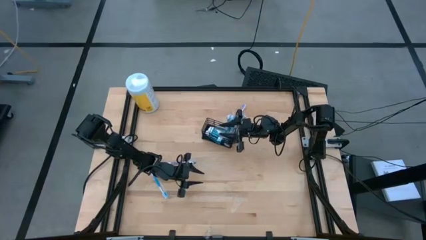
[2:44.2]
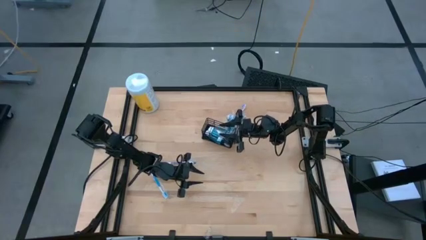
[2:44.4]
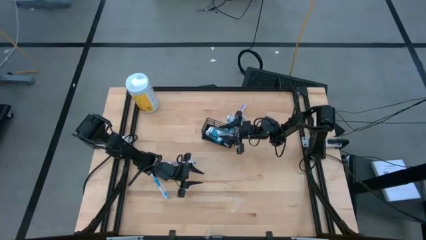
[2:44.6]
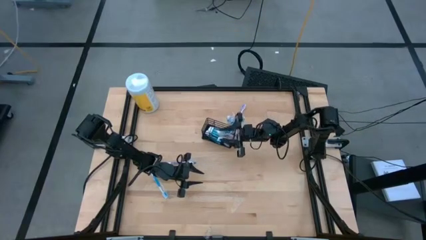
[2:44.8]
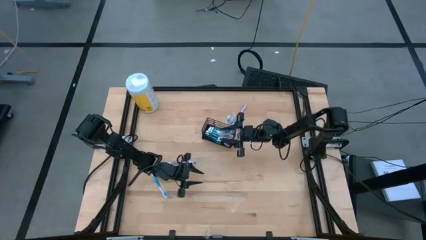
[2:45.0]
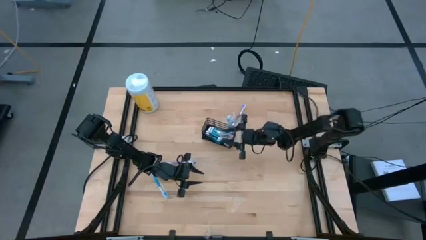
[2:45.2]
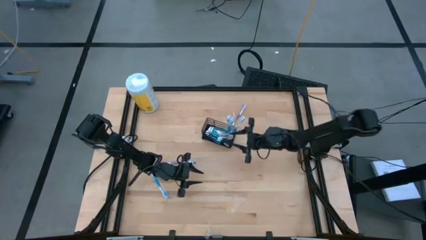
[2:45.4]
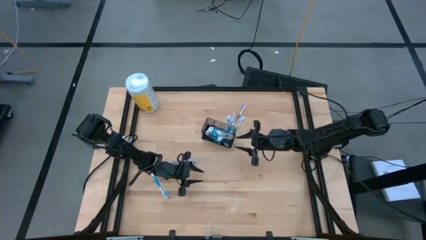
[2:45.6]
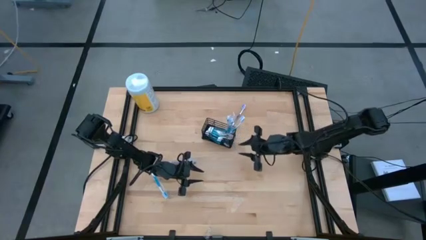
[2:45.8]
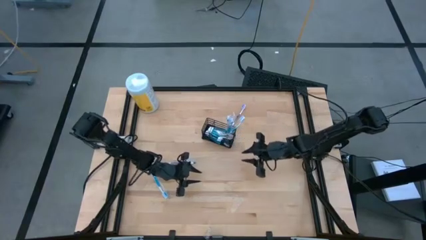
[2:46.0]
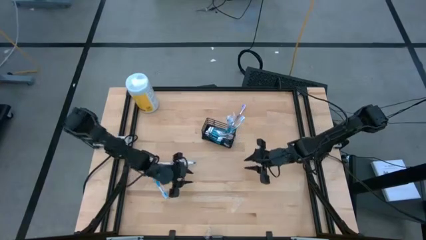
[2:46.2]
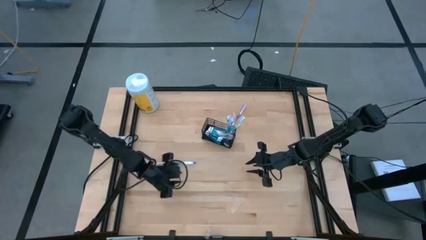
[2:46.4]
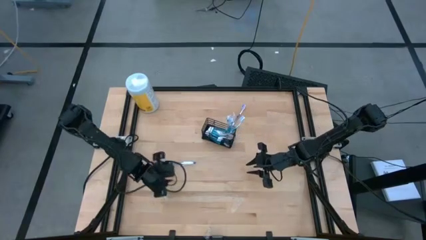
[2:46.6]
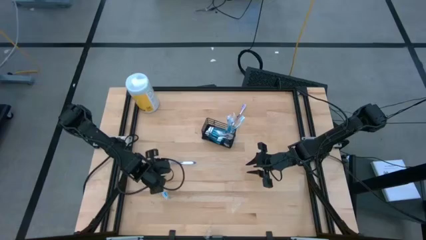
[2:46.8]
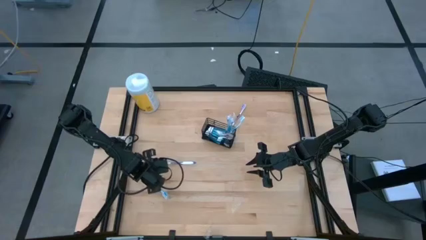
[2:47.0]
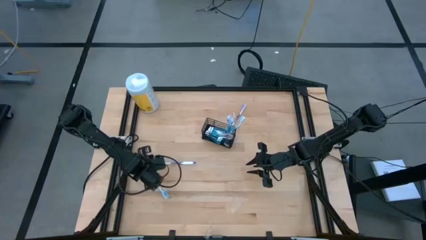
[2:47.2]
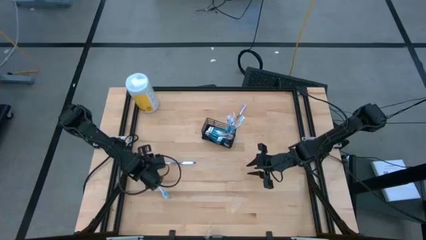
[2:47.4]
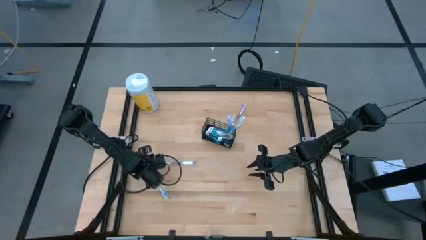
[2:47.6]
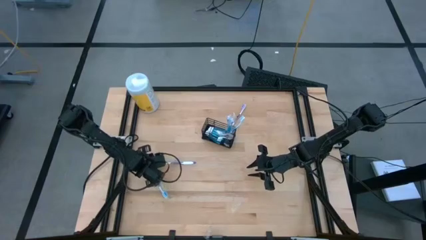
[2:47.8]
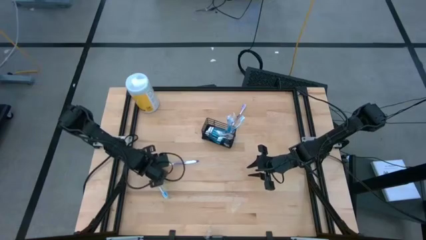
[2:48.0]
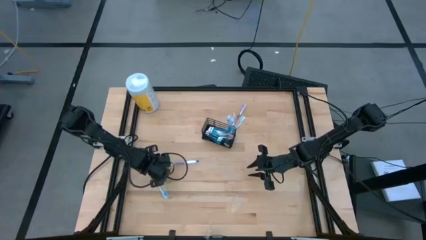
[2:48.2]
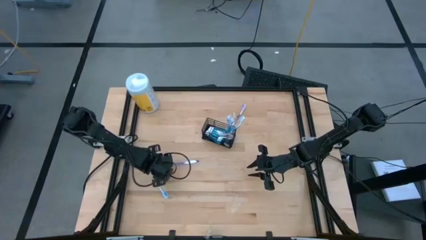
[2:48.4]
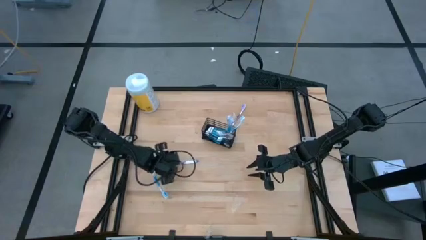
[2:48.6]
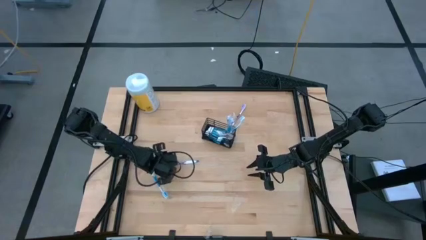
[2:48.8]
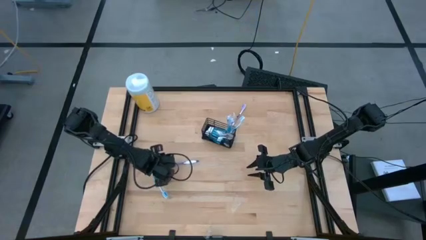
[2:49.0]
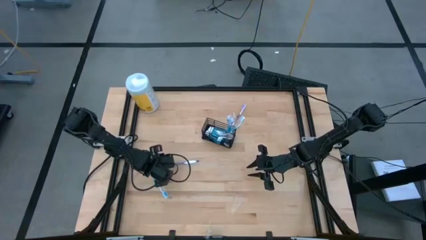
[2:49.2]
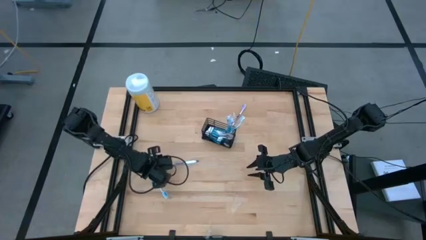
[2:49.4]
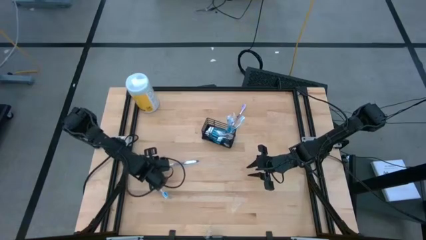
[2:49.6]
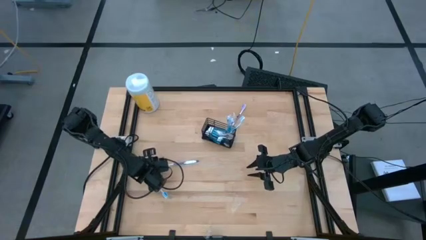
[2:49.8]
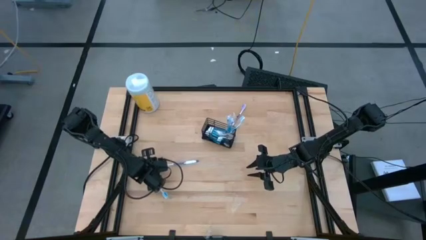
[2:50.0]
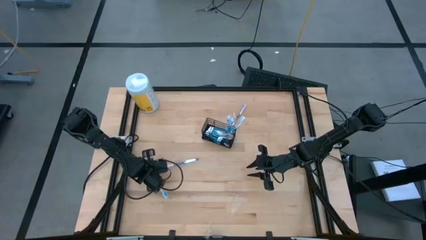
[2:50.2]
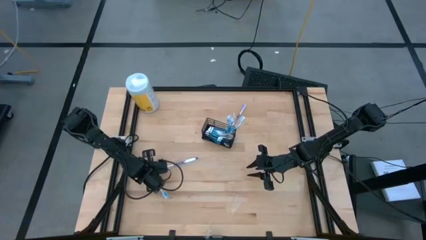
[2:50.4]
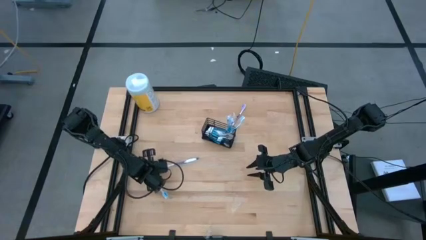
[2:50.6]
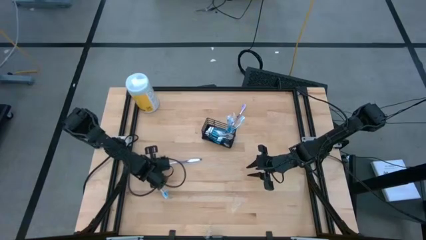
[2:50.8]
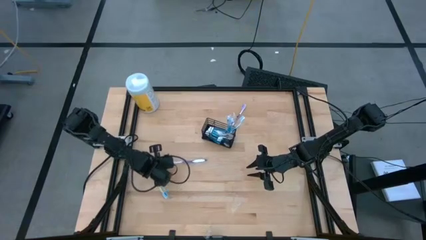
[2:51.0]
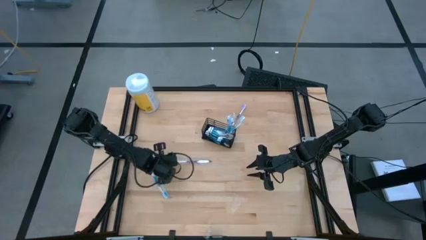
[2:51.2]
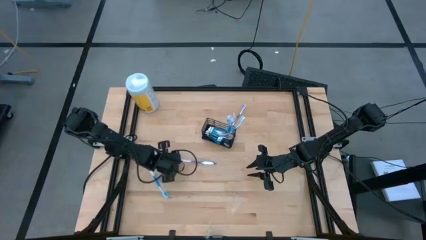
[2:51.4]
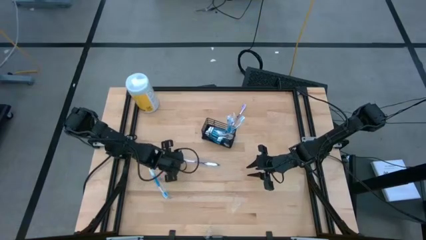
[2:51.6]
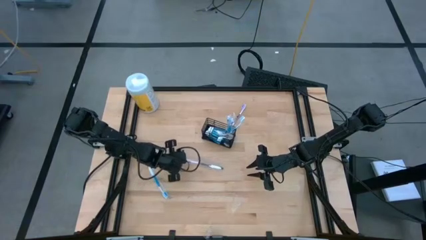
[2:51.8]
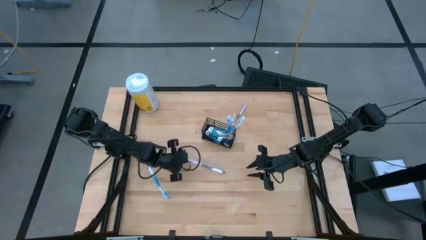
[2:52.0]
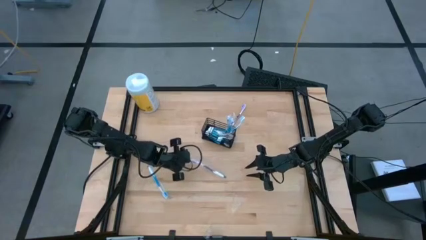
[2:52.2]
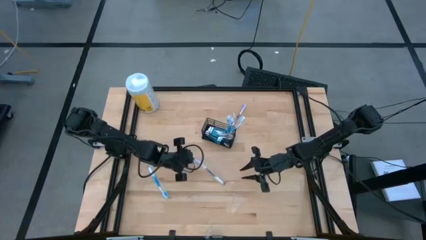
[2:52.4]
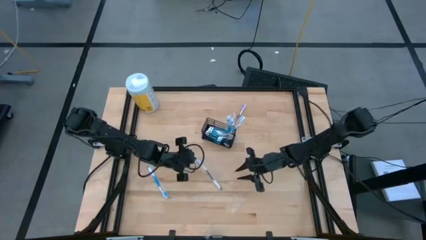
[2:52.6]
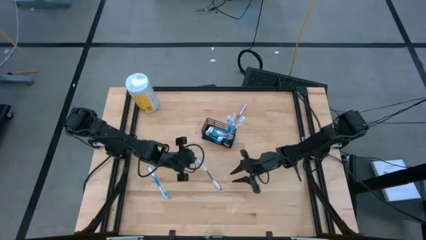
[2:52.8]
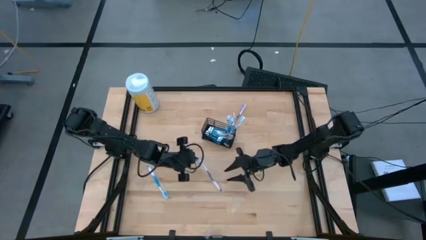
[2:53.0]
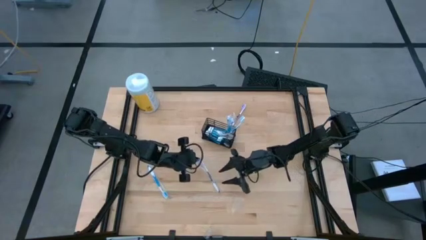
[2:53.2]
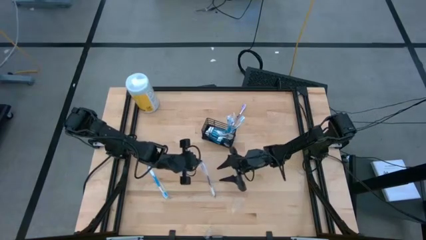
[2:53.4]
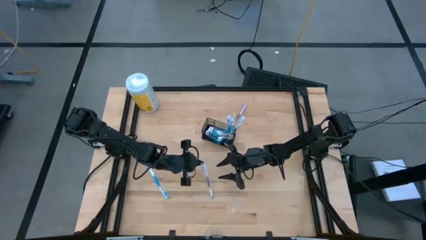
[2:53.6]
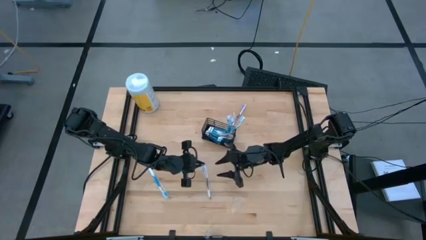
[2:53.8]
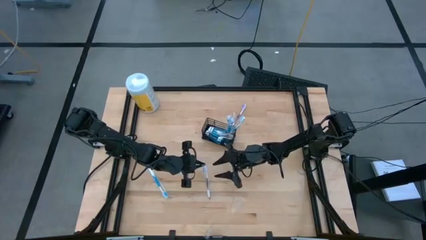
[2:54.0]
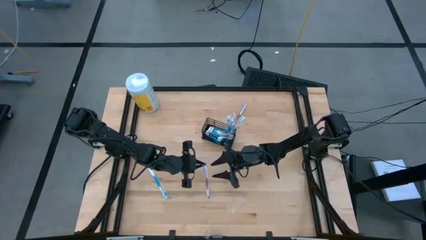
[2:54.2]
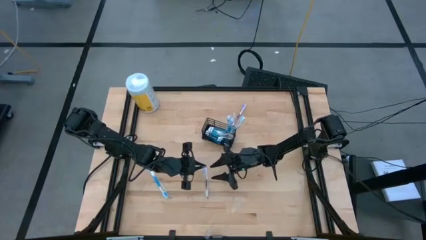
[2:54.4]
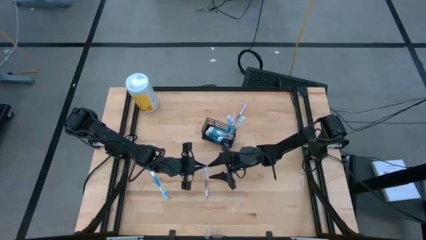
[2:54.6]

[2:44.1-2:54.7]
Task: Pick & Place toothbrushing station
Put the purple toothbrush into the wire organizer

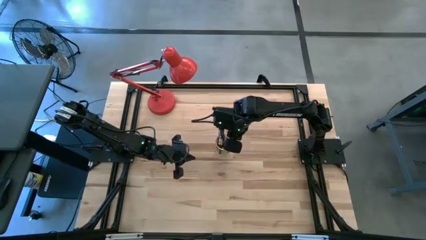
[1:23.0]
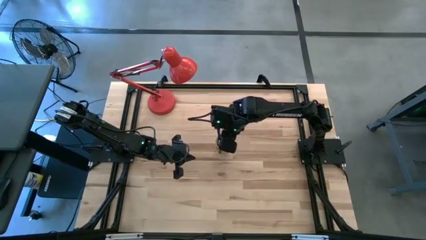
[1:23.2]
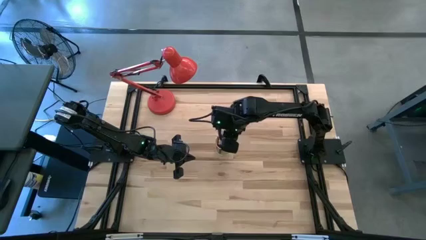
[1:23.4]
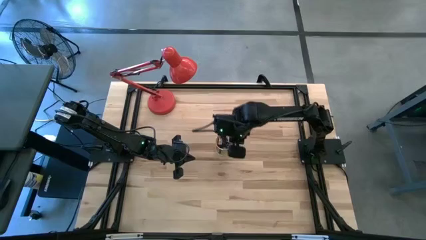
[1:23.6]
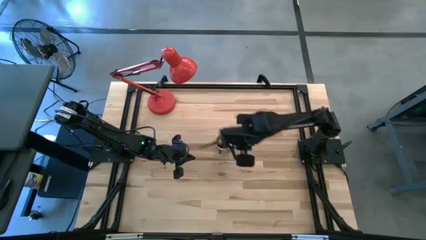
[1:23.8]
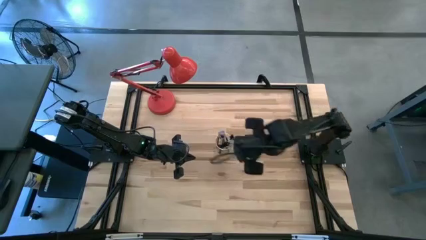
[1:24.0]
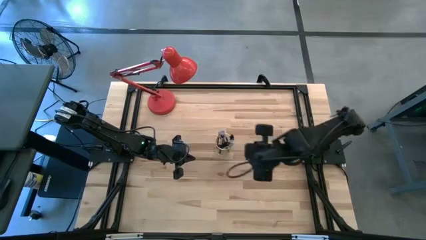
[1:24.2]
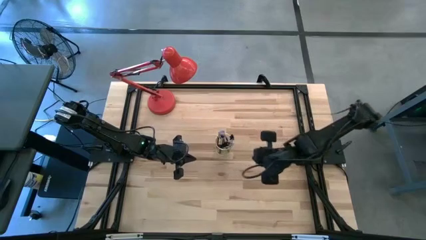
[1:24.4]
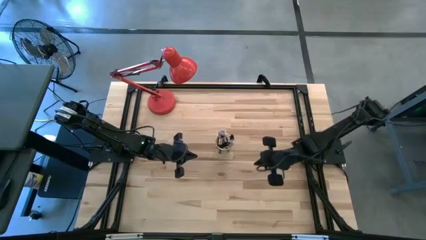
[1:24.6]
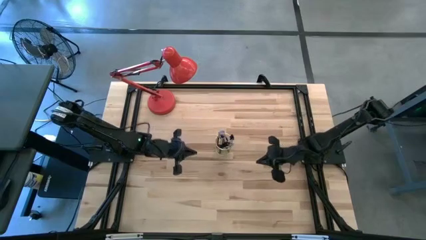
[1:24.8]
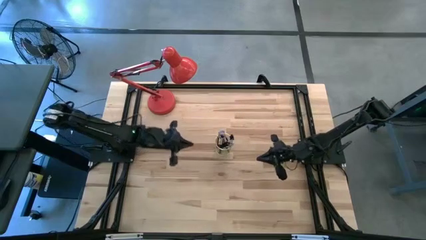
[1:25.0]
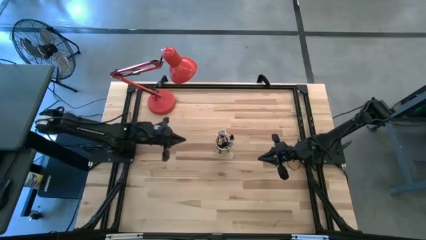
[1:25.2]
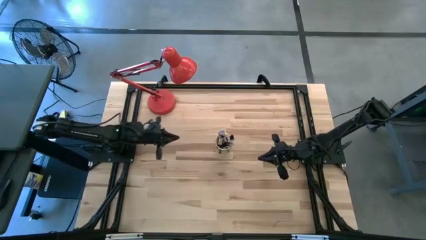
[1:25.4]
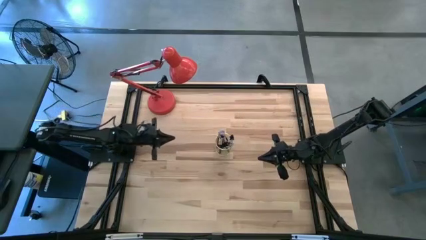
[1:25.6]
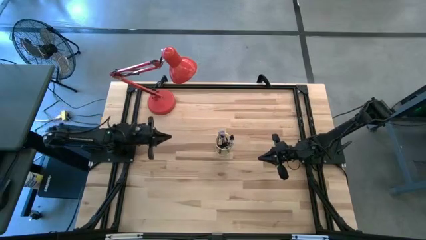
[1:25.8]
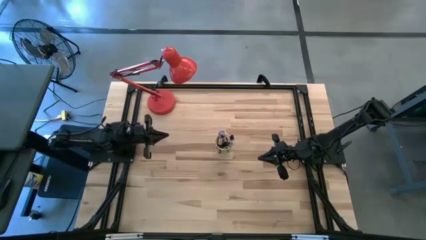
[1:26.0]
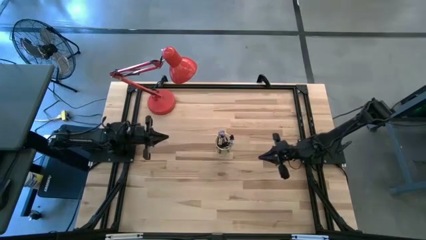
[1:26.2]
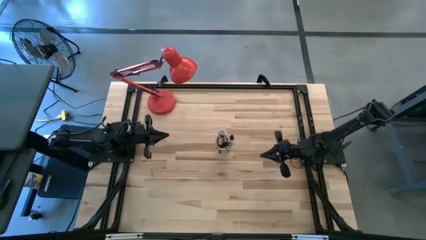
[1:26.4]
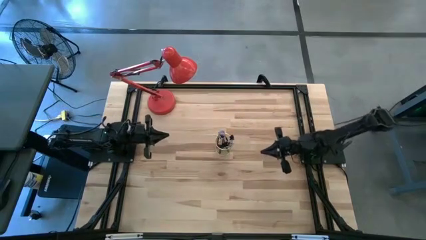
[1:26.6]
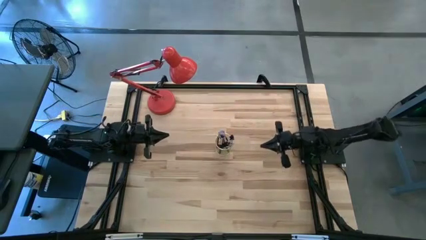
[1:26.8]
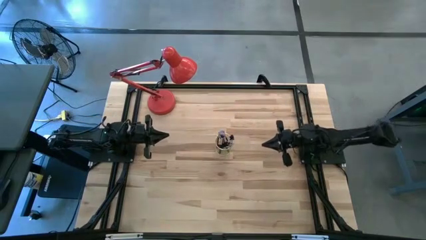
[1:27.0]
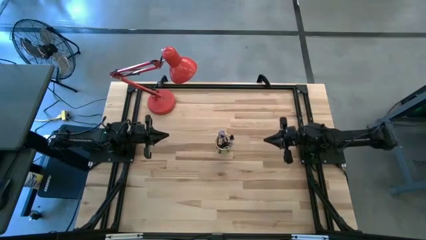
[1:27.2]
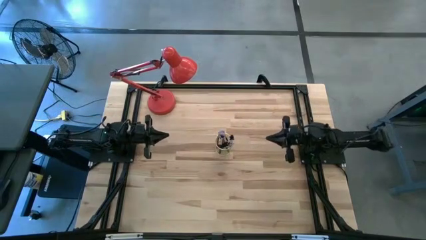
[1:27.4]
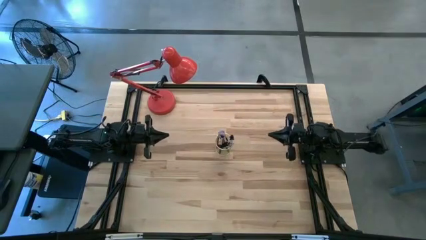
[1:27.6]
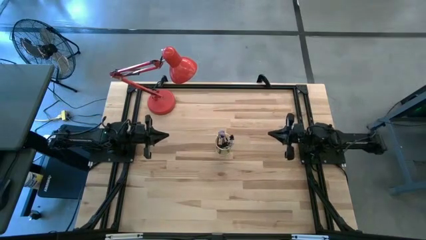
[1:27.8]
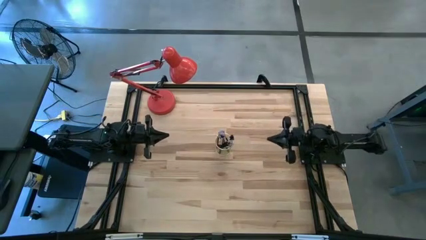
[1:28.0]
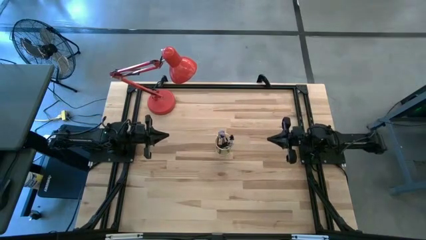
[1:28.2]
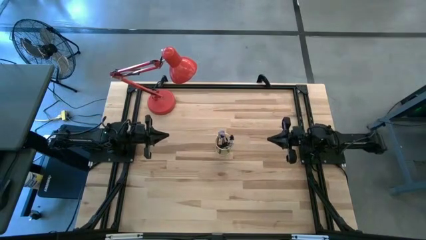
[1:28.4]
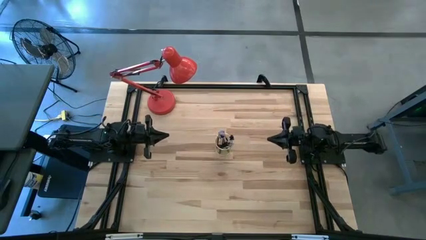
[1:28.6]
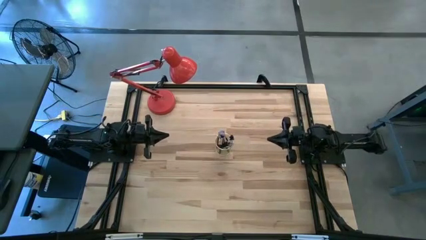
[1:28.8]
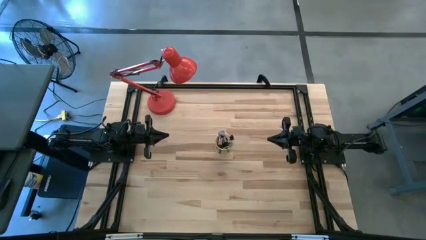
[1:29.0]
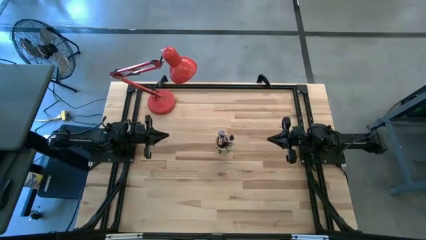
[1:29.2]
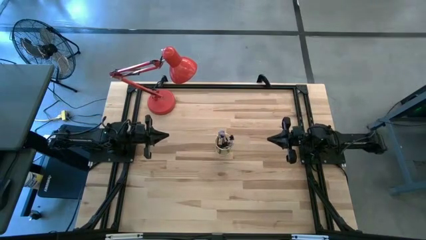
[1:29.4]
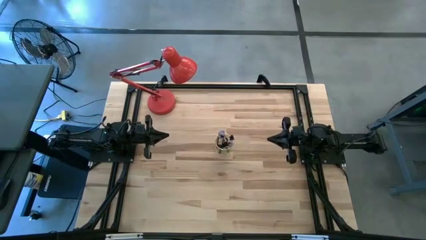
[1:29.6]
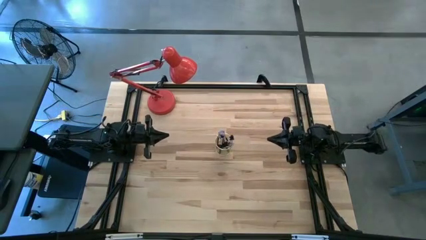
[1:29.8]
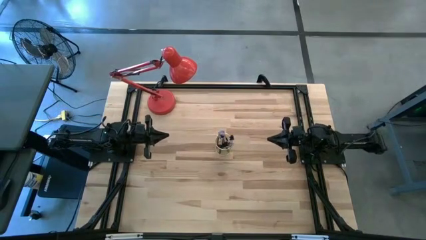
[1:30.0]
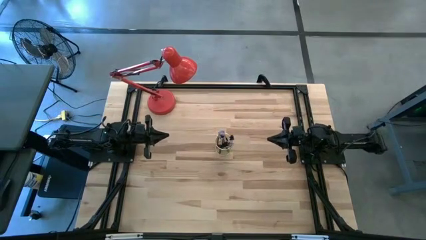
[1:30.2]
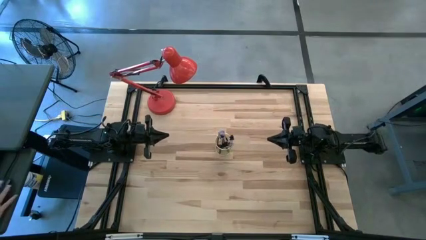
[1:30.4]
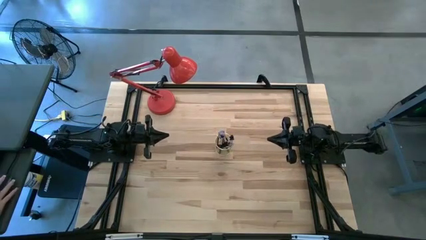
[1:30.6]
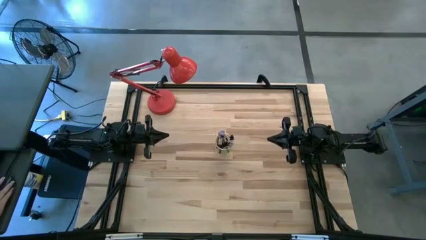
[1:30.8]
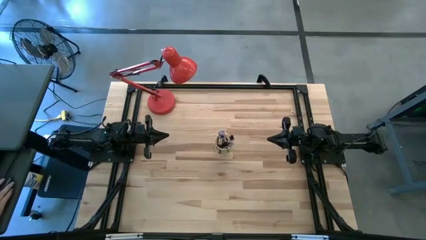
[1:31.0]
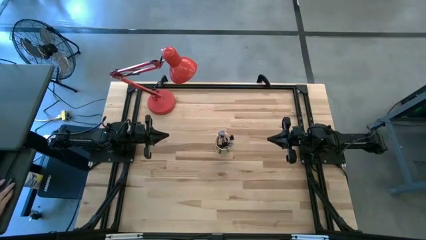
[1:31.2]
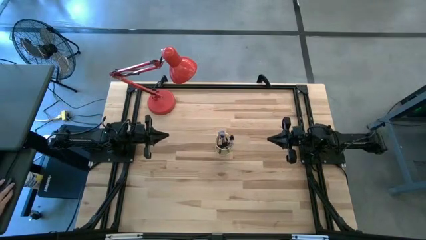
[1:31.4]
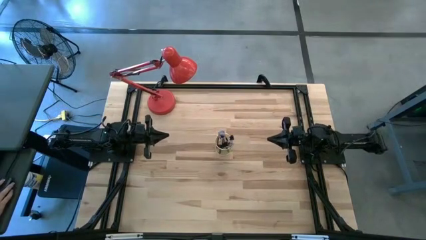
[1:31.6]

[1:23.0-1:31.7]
Task: Put items in baskets/containers
Return to Home Position
